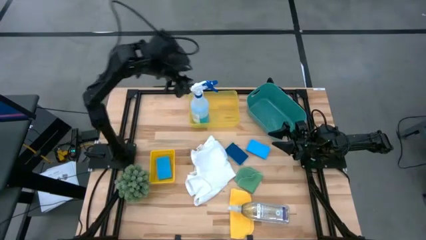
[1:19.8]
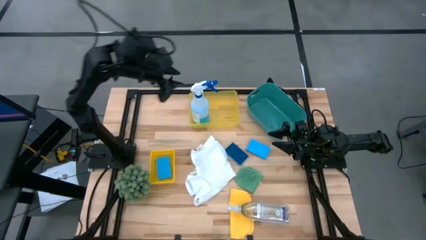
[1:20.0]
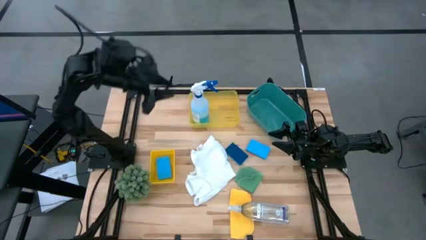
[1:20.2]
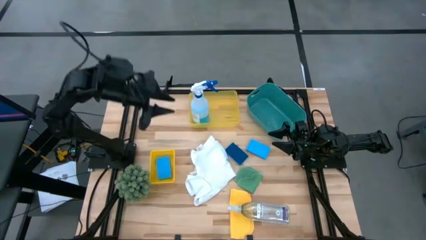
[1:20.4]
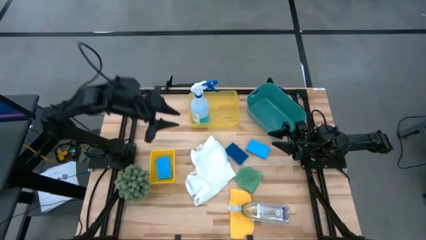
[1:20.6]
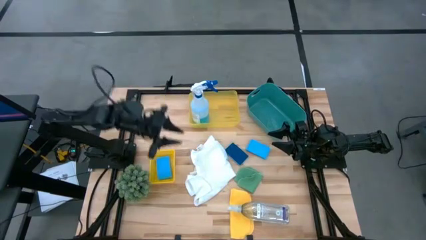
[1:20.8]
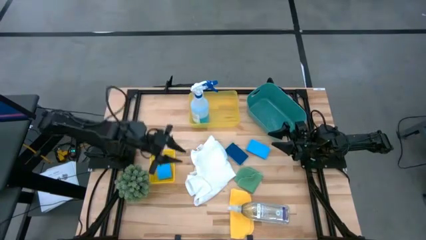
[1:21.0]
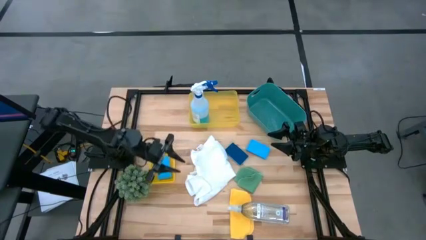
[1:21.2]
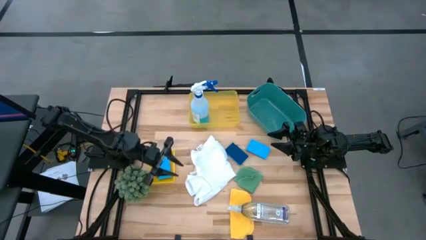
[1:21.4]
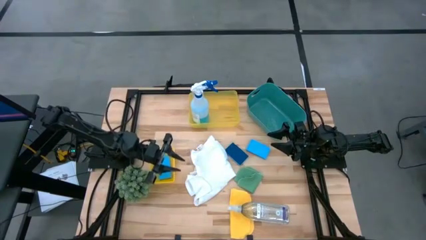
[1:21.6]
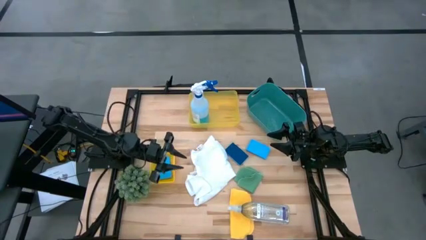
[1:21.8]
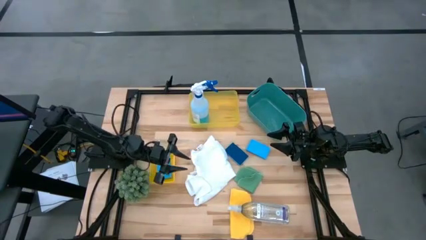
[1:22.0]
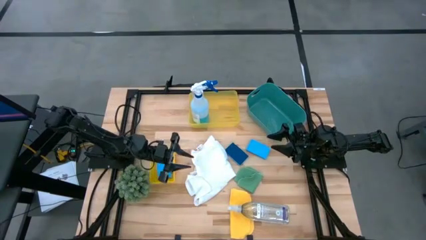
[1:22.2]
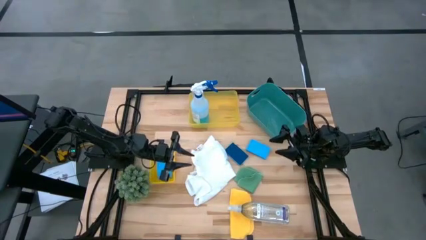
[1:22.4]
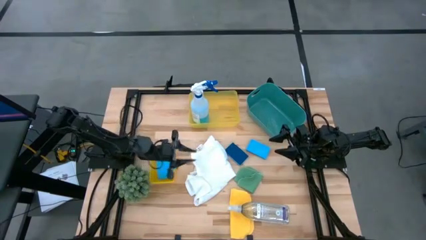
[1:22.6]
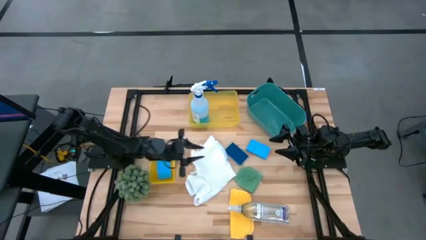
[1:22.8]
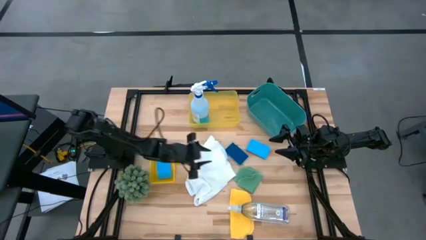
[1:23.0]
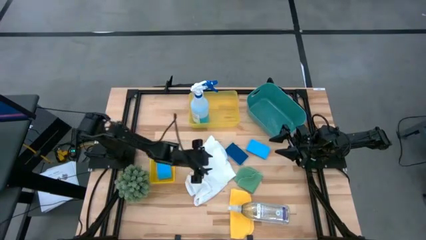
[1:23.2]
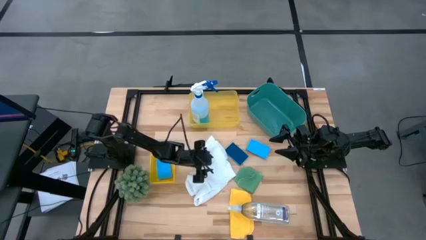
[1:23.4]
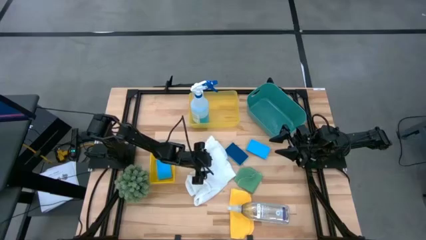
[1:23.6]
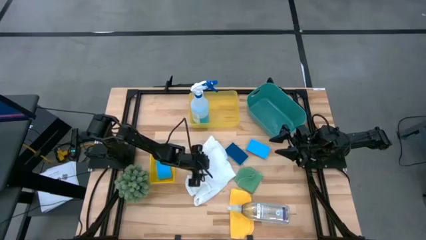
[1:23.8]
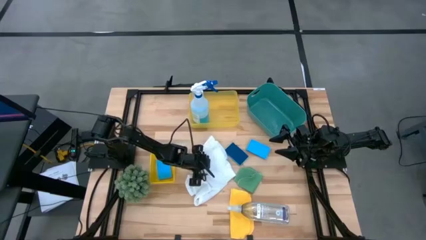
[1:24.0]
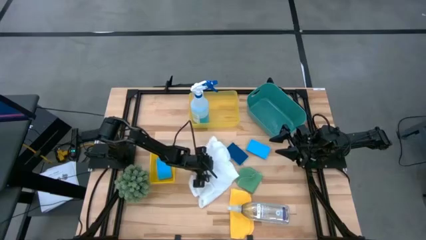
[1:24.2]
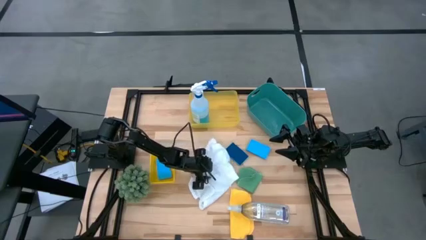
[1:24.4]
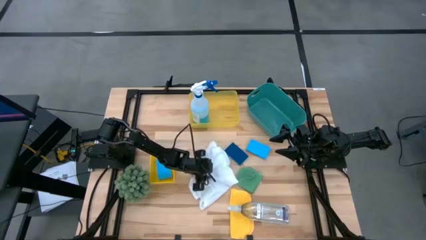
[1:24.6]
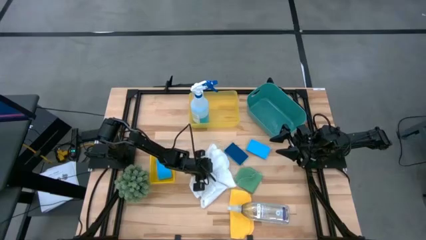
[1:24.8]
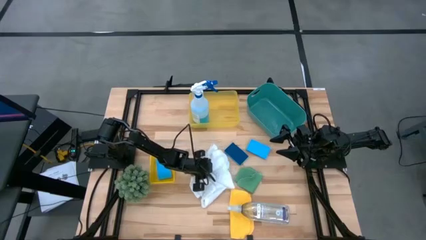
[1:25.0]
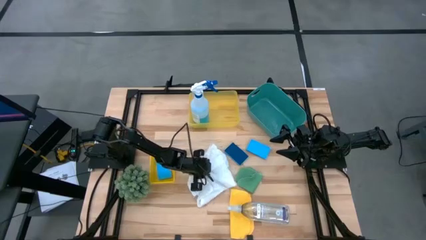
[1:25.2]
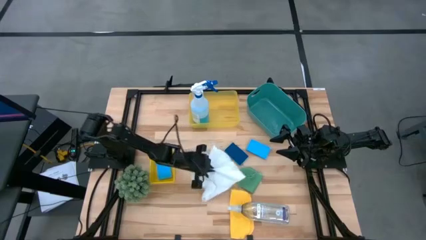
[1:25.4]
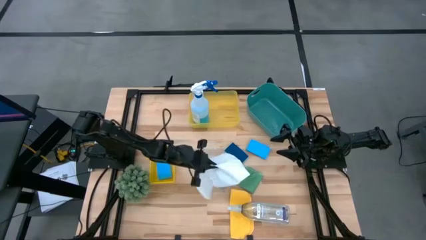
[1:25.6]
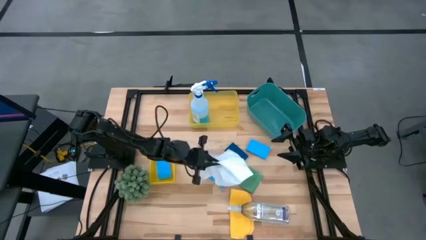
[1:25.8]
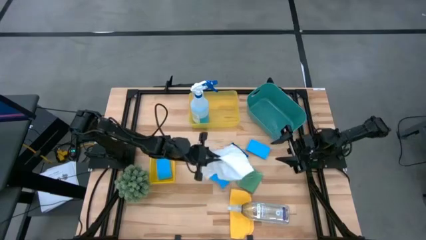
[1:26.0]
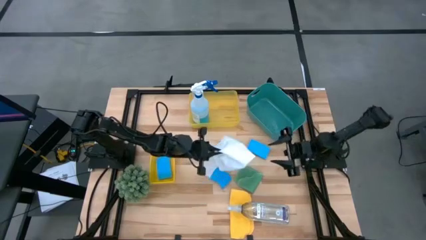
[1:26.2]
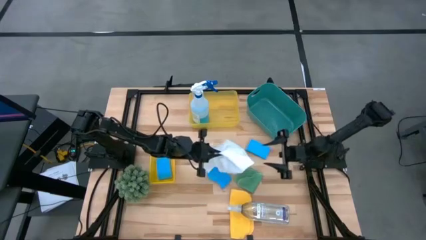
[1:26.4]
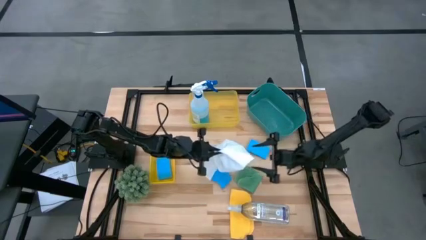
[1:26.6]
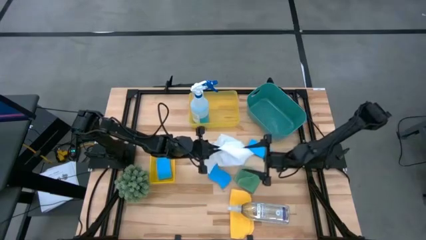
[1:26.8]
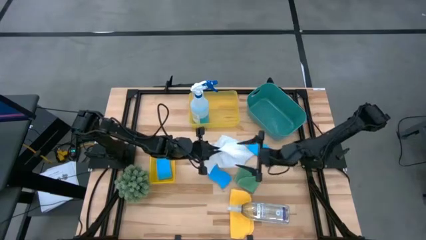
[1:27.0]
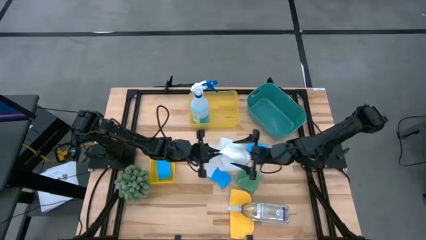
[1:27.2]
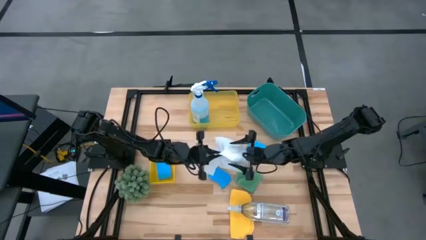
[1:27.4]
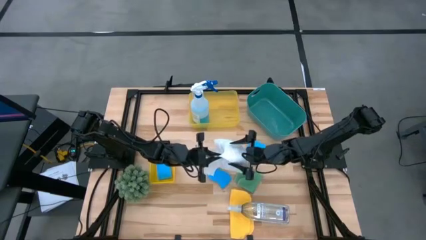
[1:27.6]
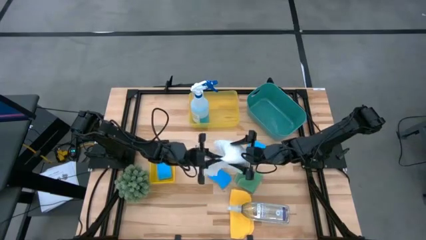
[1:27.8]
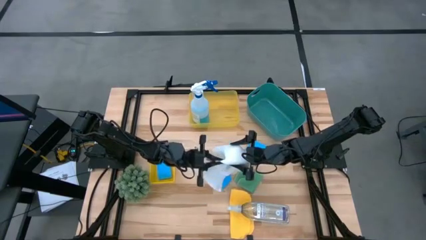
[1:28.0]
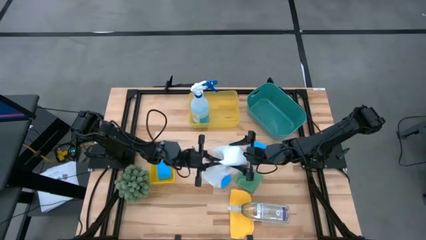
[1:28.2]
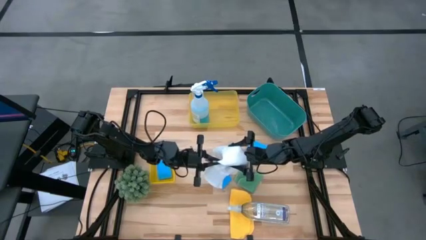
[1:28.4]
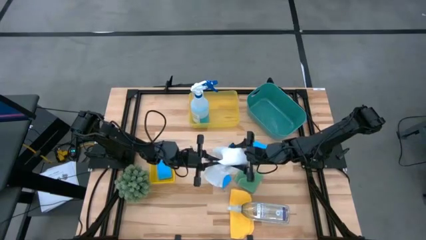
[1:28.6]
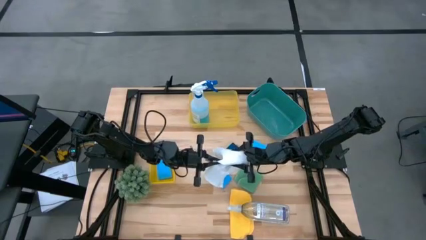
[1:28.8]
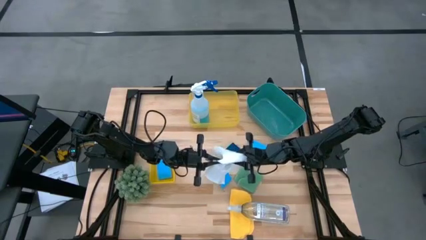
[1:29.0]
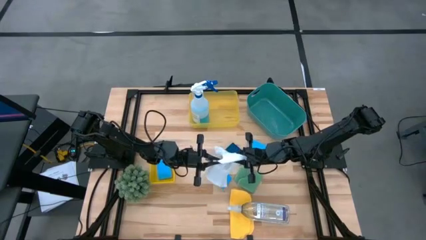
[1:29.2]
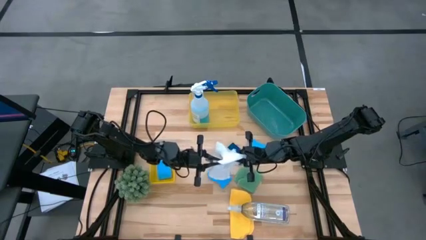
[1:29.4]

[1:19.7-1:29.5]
Task: Pick & Place Kitchen Items
Put the white microfiber cloth into the green bin

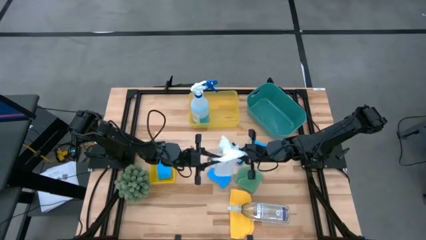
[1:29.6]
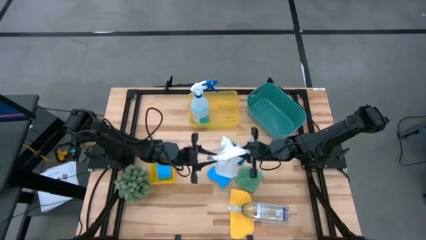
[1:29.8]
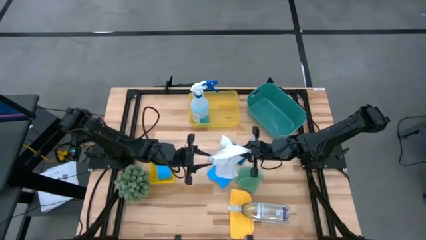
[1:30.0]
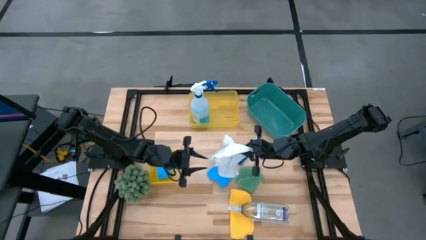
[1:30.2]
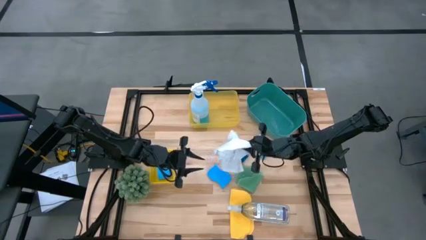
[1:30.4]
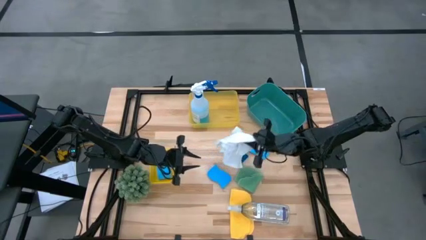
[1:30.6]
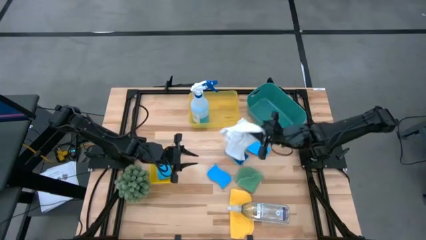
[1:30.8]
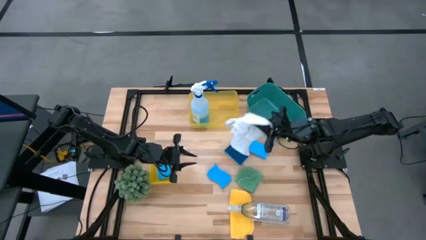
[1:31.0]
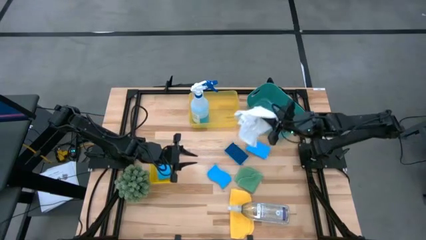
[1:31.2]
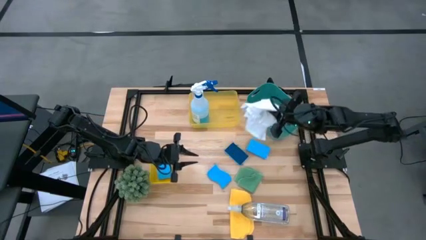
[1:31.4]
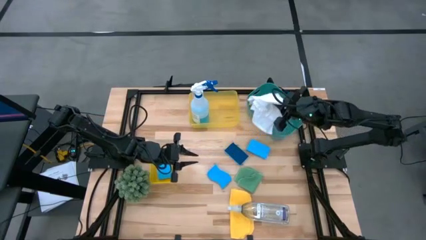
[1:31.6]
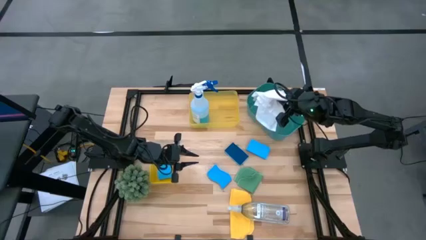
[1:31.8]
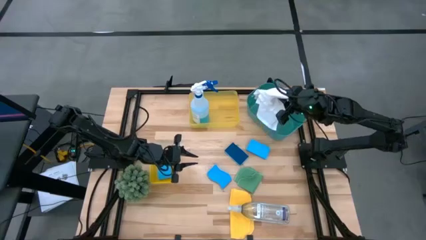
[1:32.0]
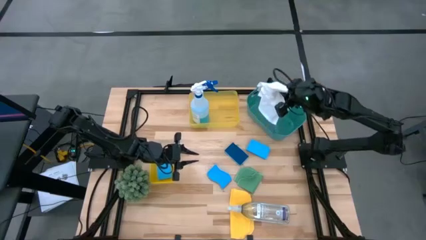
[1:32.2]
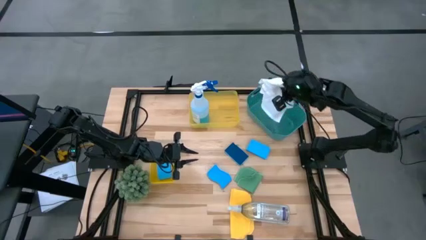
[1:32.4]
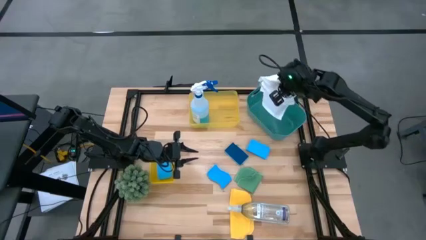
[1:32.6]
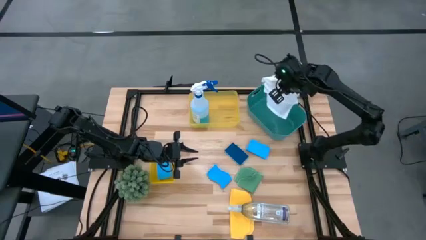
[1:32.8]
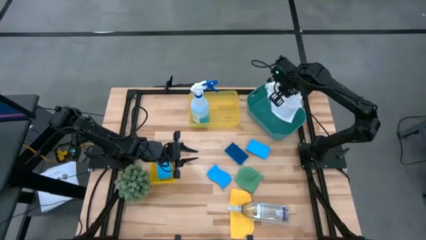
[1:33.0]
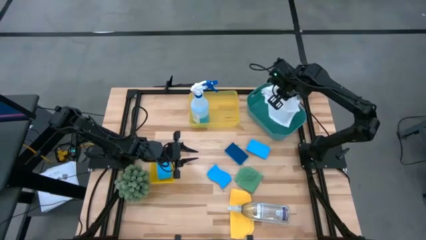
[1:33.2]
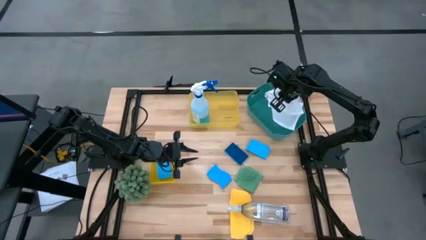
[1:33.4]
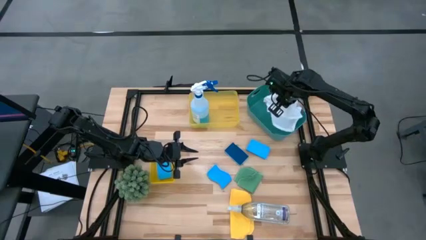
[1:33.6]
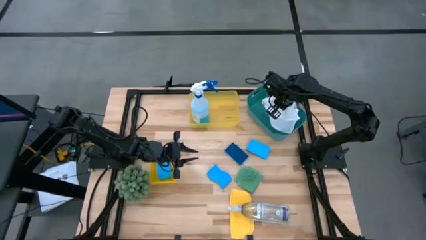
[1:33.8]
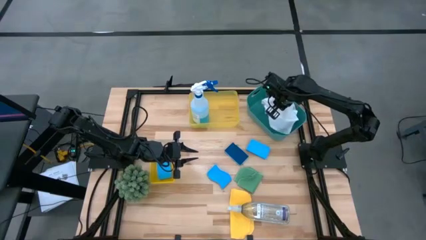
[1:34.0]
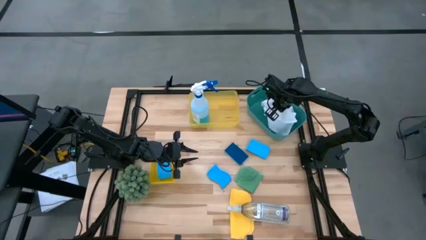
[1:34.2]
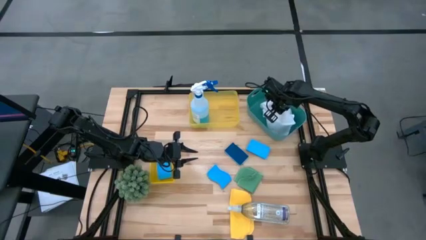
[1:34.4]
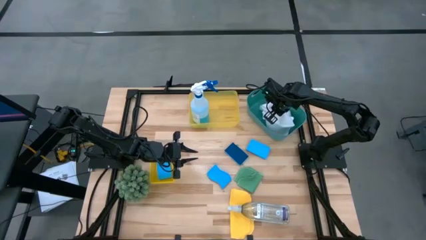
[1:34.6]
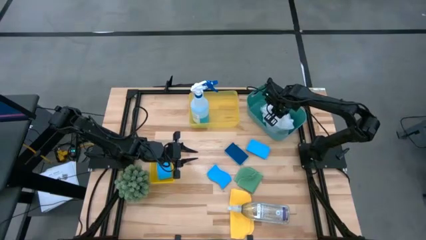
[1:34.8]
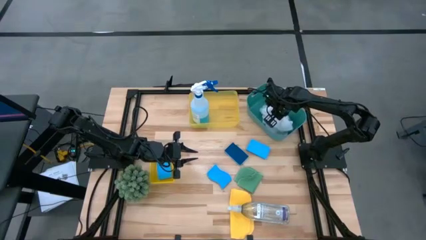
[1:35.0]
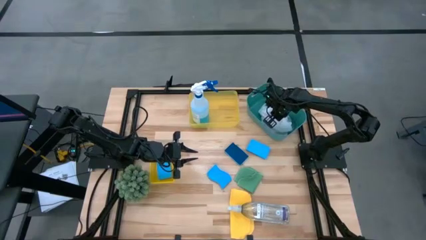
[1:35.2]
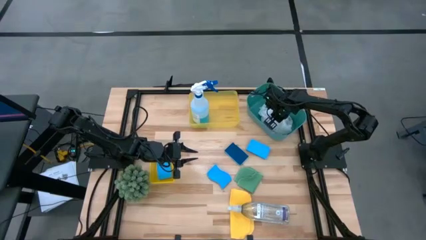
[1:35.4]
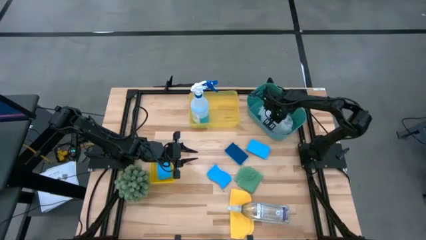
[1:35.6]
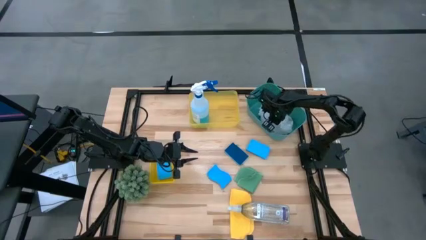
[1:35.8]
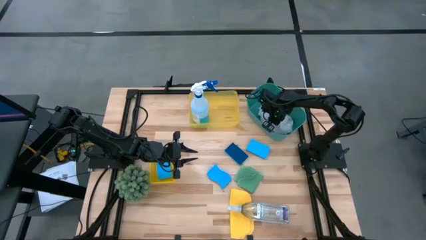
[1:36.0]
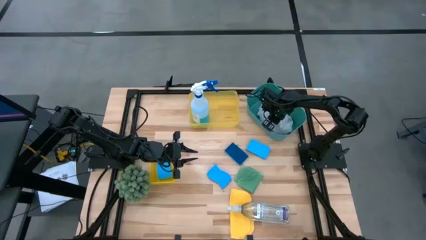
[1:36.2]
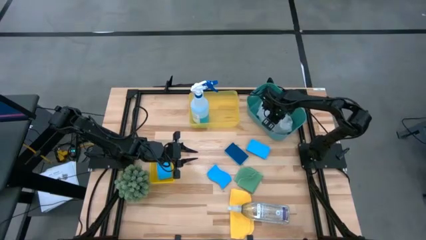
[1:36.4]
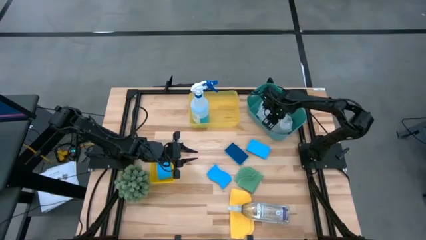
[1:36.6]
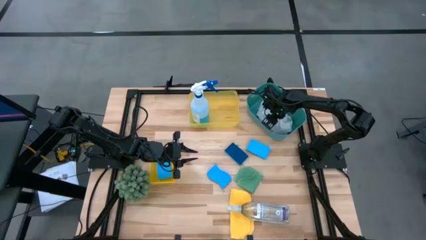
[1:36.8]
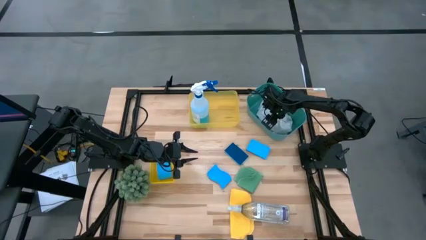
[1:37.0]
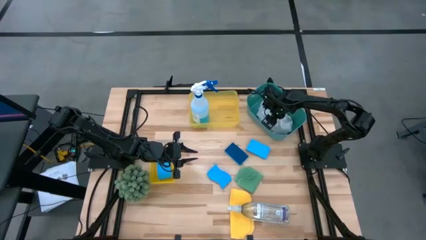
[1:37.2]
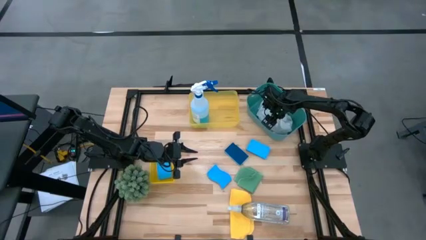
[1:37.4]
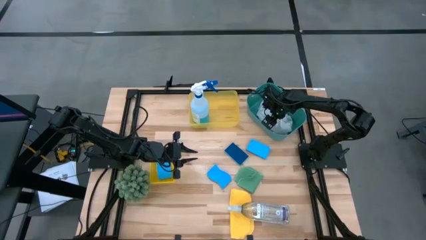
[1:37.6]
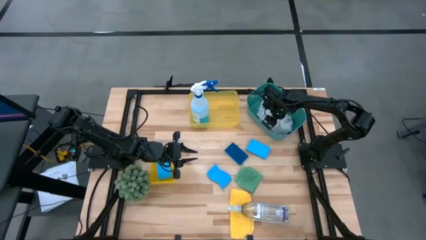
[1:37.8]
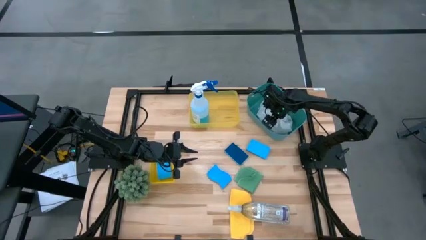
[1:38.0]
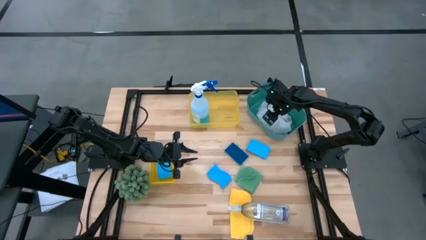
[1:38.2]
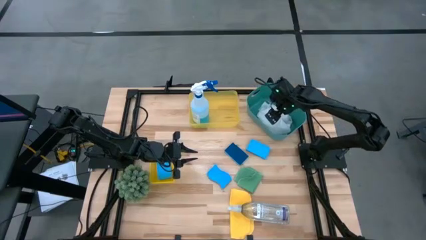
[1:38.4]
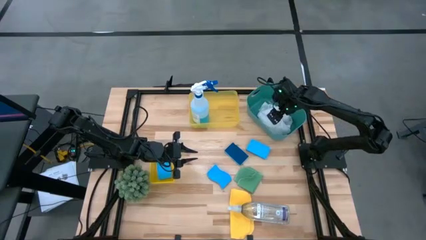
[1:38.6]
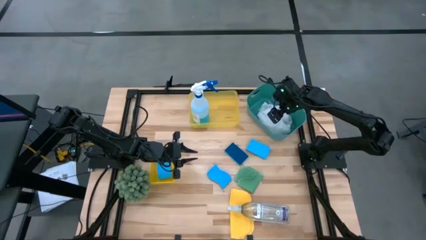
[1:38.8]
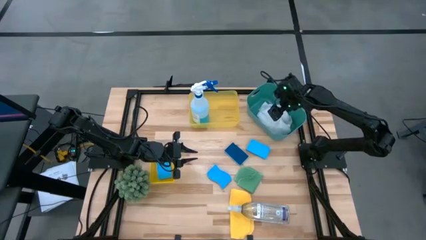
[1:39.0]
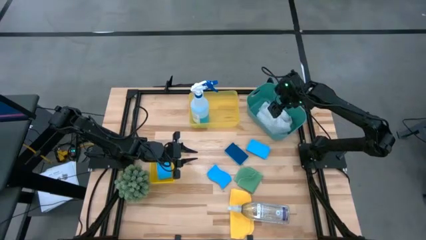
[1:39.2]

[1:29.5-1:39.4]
Put the white microfiber cloth into the green bin
